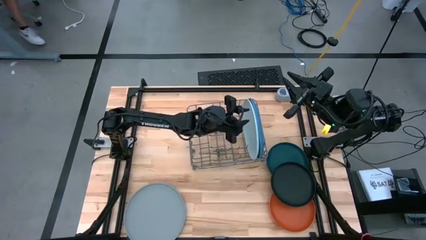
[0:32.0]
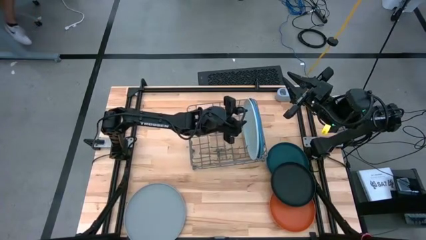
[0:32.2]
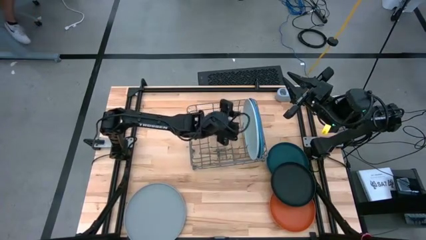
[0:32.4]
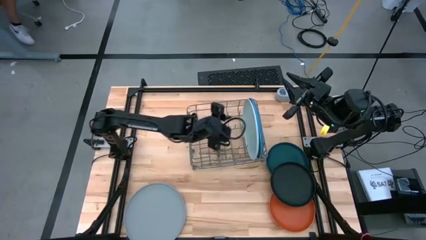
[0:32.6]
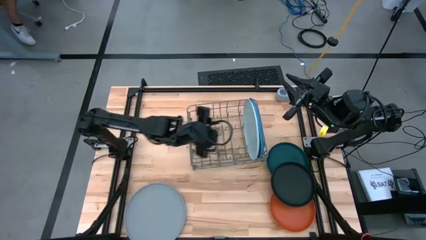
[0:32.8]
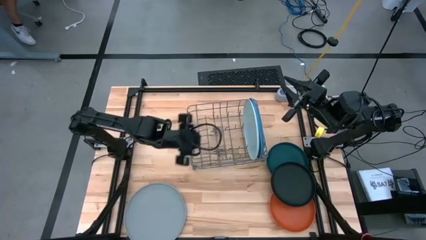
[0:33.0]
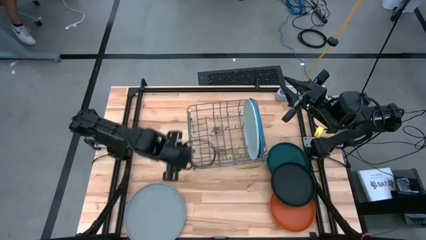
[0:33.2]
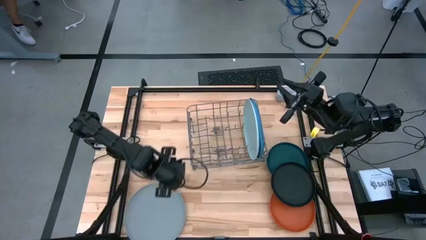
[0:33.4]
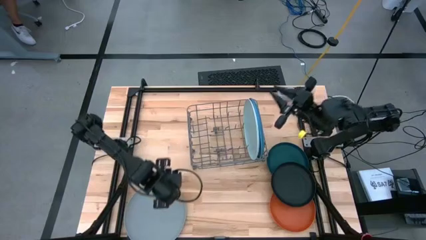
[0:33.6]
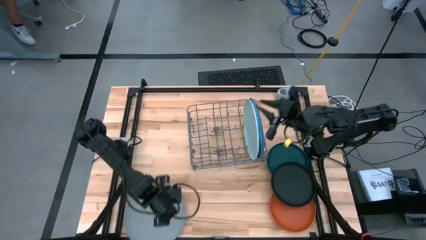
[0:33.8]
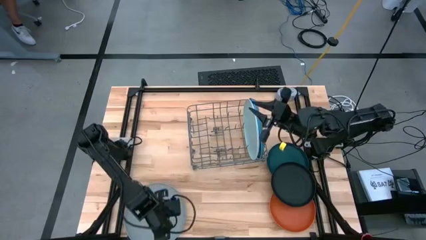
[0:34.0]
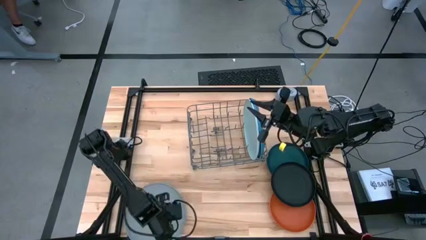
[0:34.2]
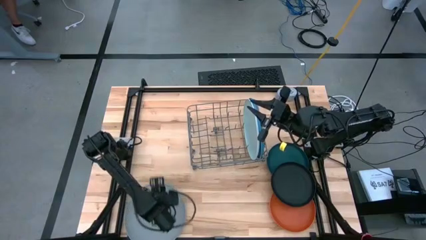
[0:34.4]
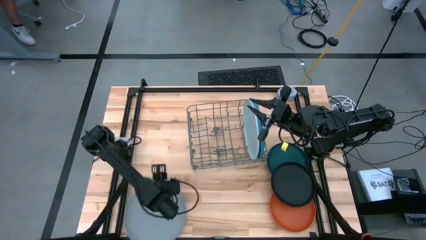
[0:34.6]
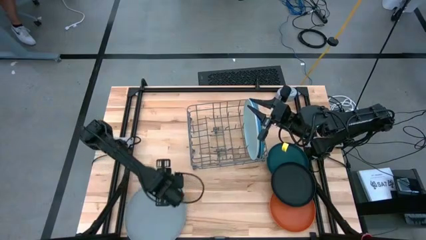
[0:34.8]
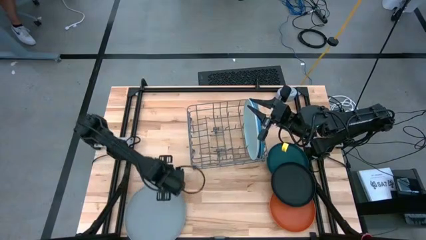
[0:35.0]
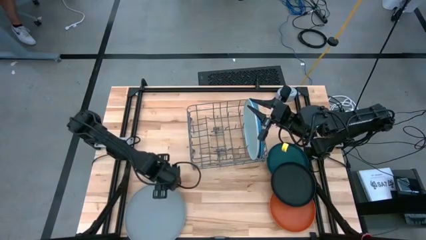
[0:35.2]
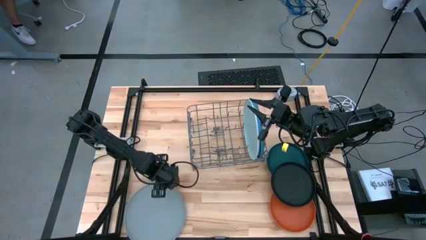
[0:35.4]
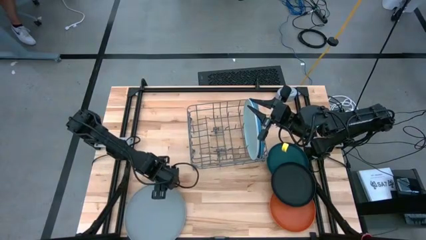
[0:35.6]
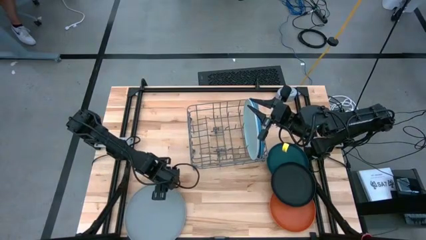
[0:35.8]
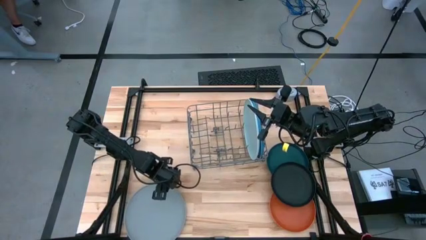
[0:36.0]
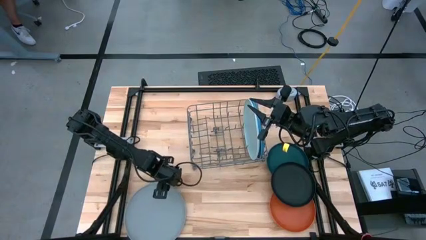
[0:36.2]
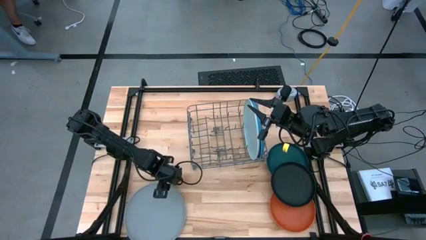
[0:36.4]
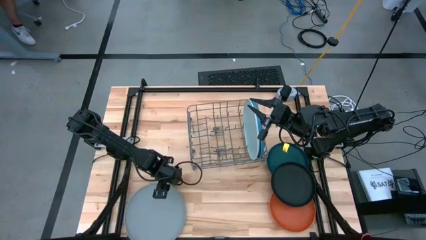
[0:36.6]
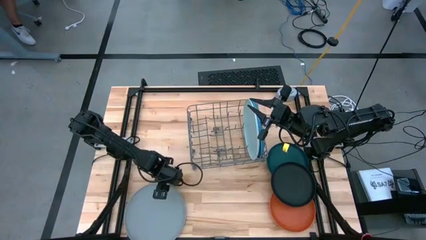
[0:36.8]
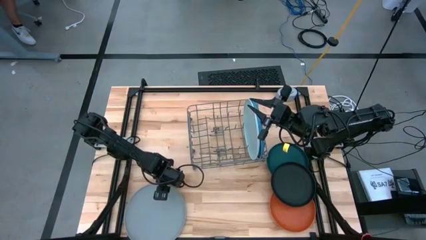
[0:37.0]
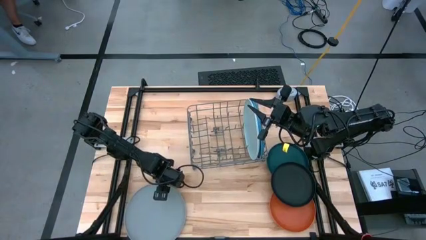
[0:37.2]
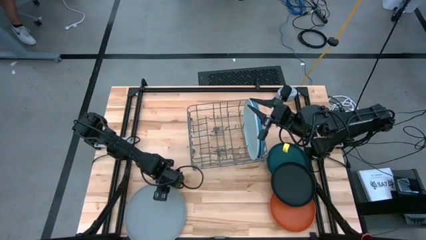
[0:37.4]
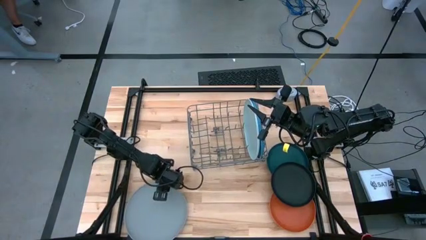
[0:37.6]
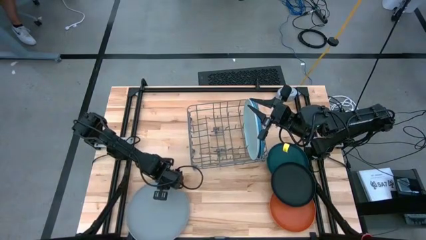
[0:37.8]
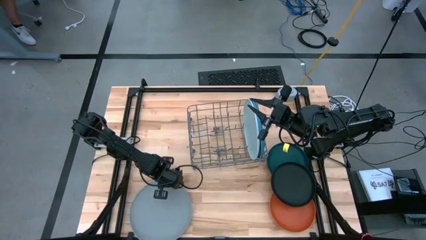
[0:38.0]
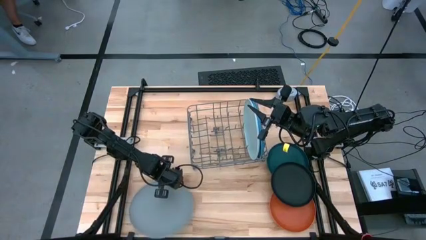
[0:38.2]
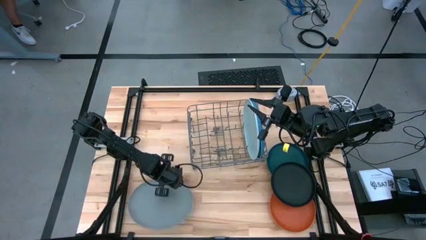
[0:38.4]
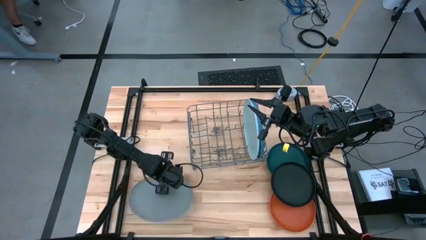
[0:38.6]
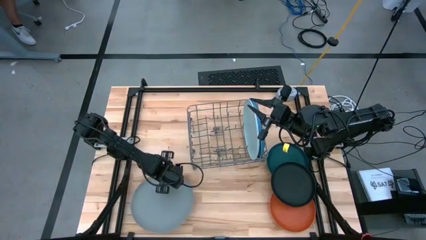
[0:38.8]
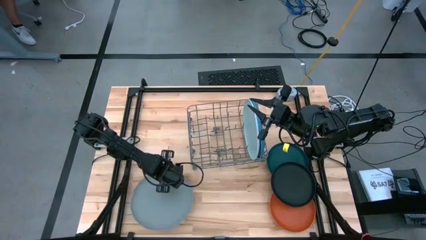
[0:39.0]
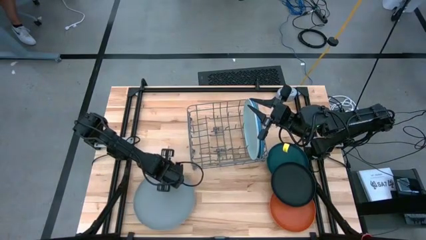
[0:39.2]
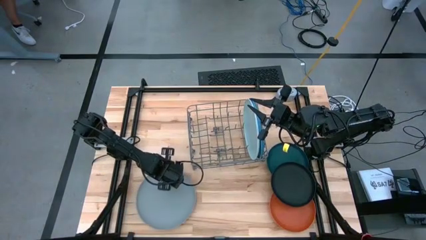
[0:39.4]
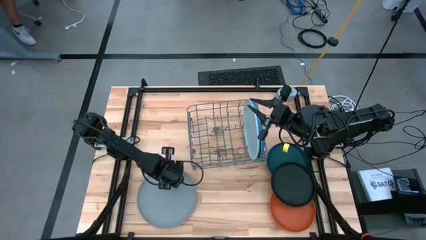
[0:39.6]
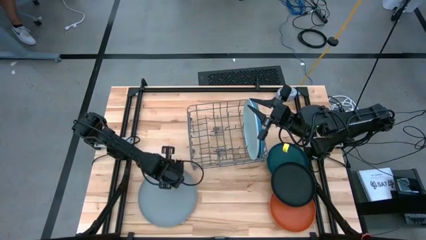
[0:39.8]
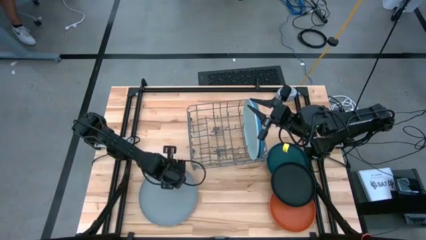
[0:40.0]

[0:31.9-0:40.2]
Task: Sort dishes
Put the gray plate into the dish rack

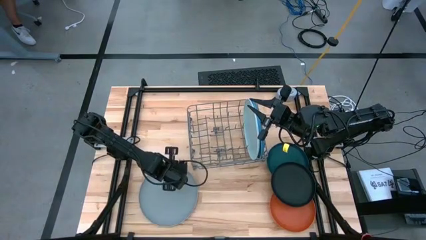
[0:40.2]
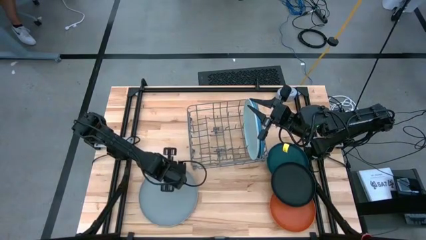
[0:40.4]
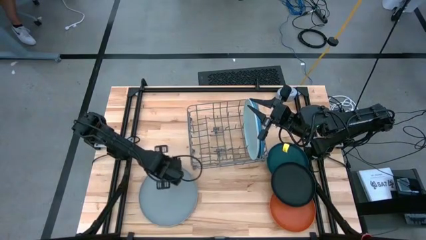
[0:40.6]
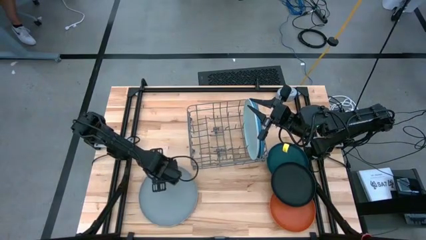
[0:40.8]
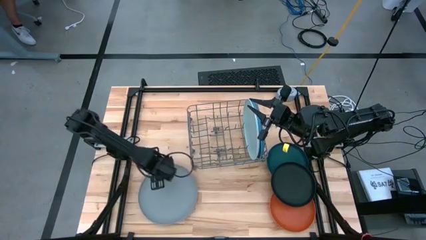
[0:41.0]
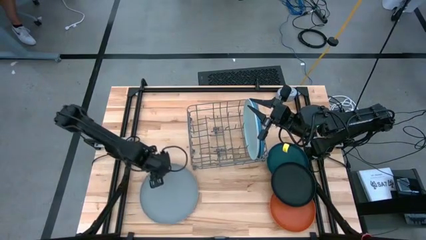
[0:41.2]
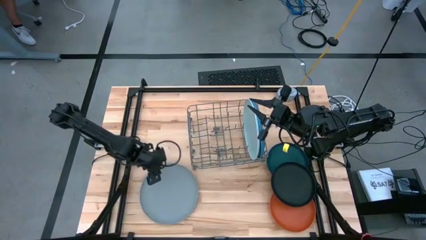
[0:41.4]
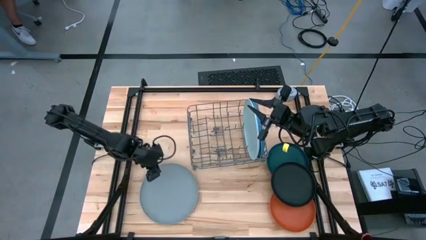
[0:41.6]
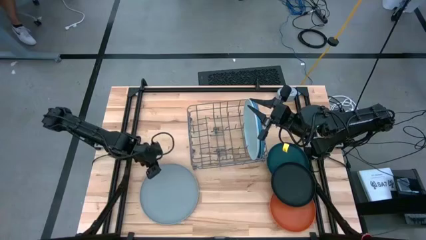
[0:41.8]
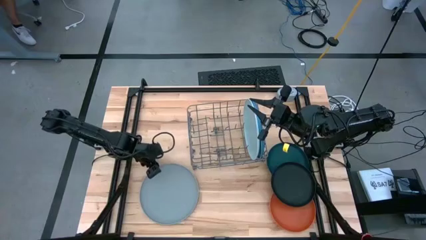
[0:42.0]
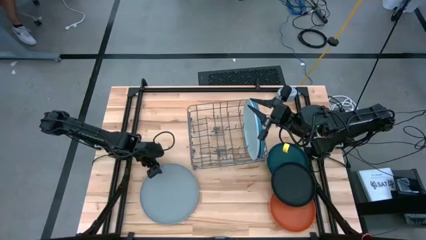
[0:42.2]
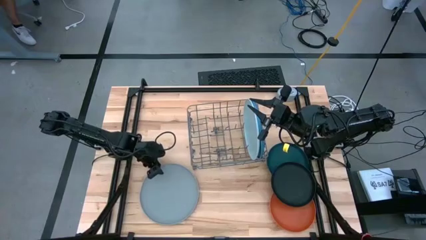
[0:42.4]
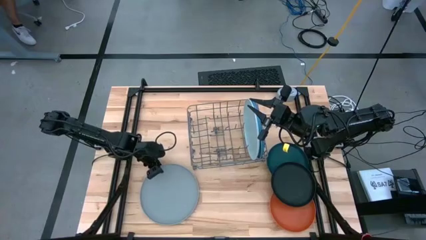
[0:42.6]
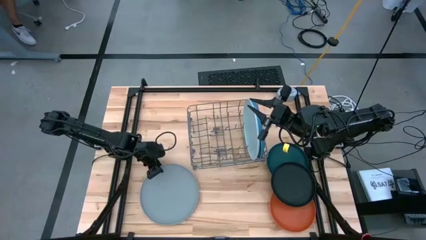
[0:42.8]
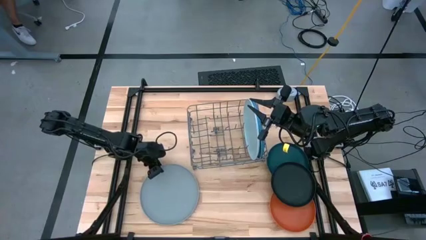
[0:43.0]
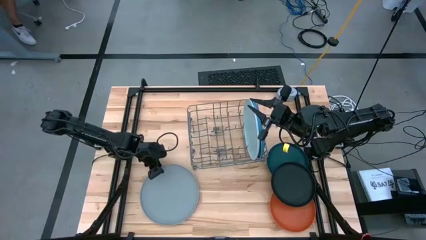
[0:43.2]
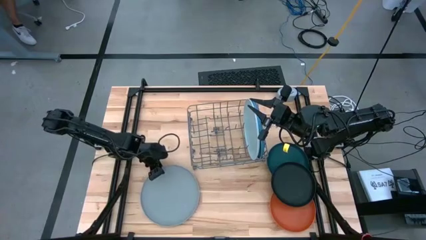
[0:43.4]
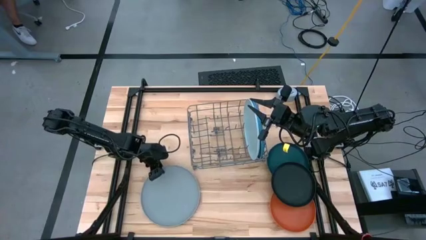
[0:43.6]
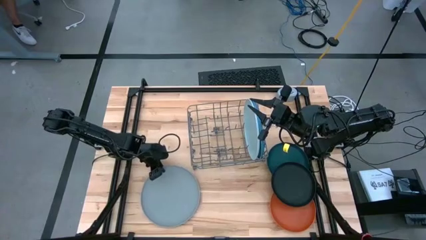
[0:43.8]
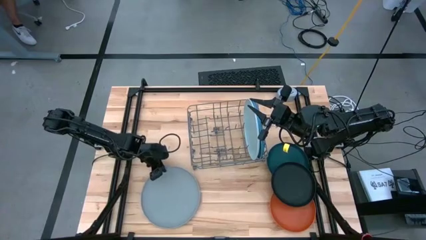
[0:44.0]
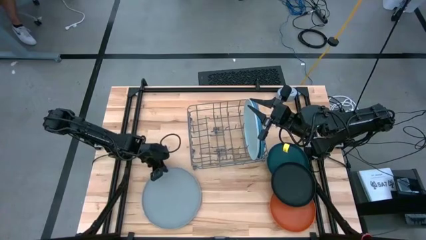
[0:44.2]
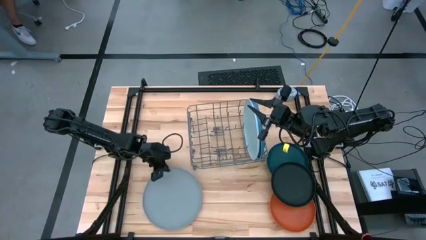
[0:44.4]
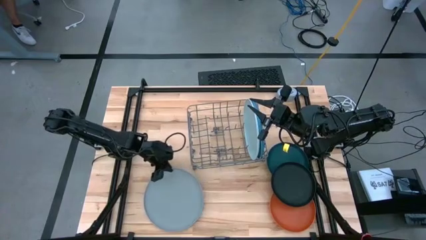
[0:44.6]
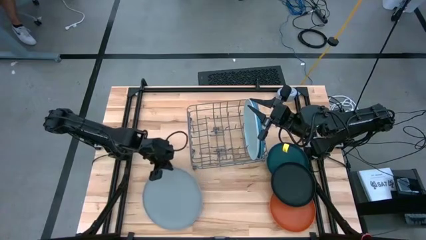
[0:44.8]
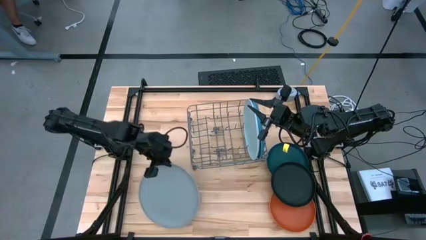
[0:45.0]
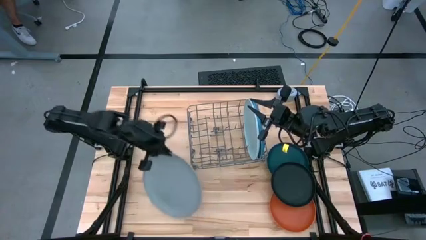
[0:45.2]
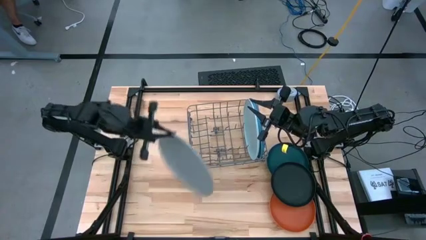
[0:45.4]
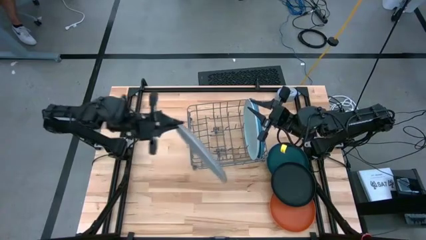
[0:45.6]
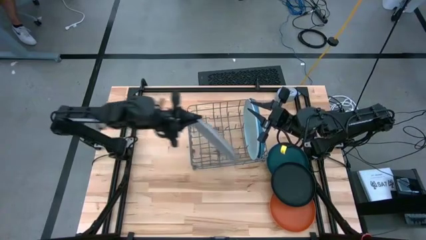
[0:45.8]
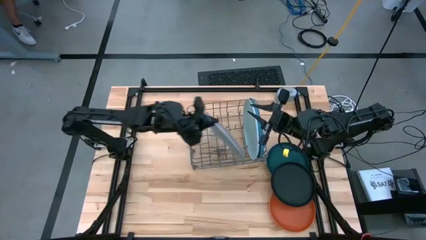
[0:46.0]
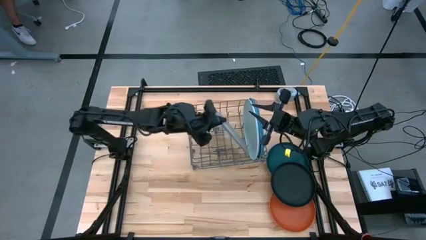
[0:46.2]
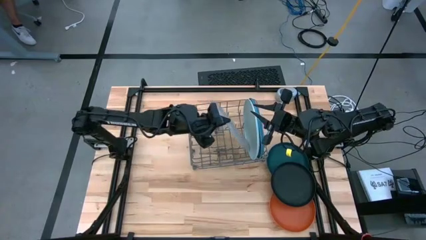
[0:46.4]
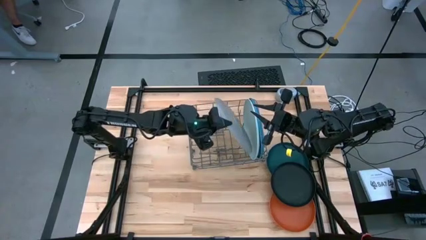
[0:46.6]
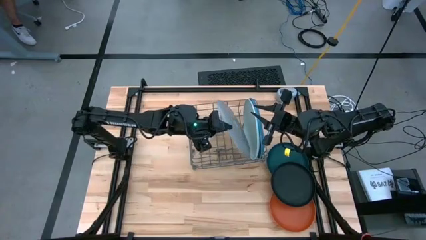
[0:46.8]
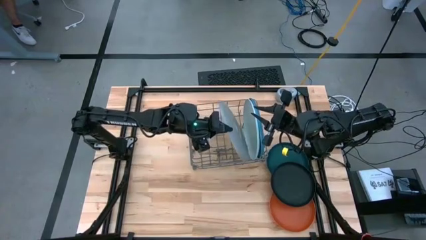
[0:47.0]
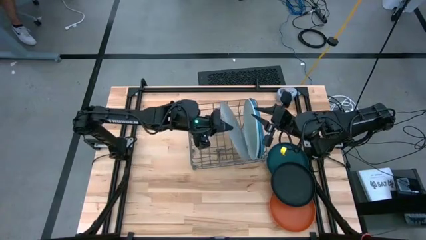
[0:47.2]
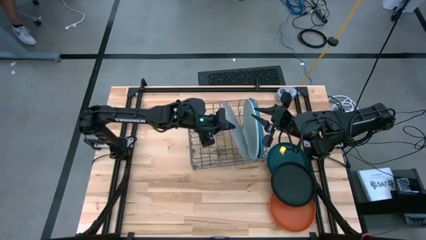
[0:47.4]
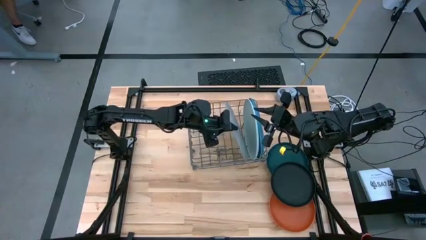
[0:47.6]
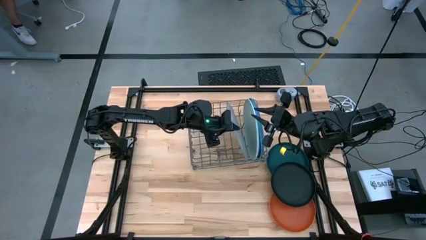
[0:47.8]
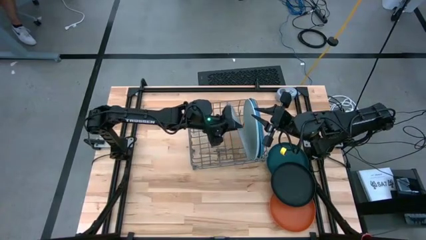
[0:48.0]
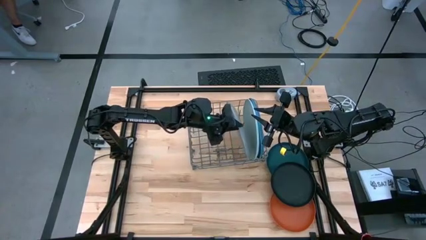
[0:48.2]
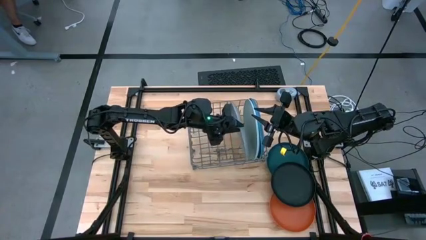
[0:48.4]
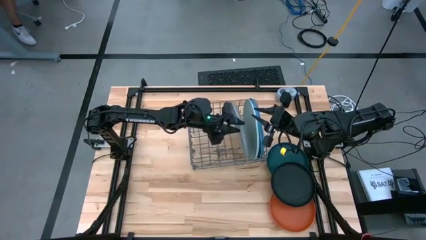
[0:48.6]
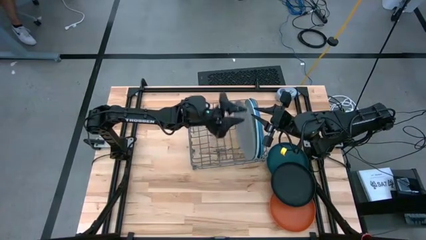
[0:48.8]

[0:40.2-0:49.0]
Put the gray plate into the dish rack
